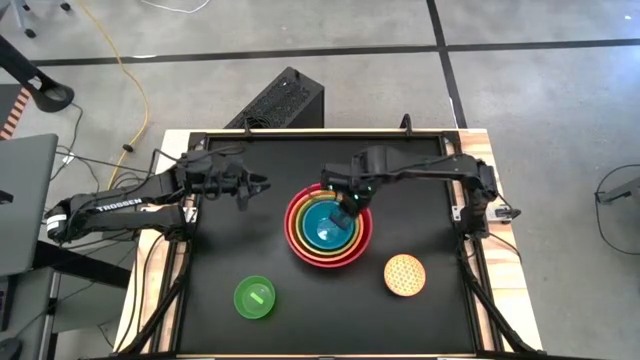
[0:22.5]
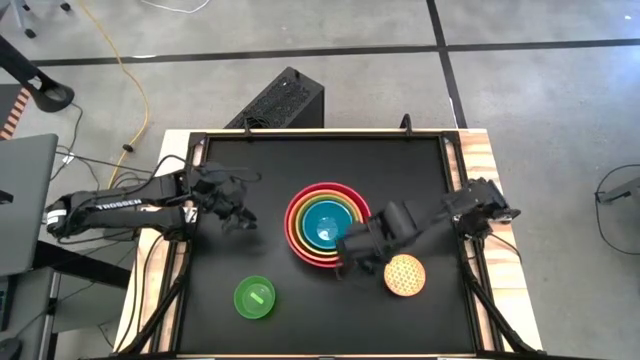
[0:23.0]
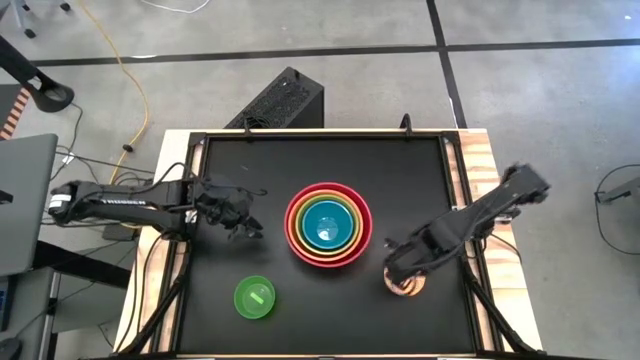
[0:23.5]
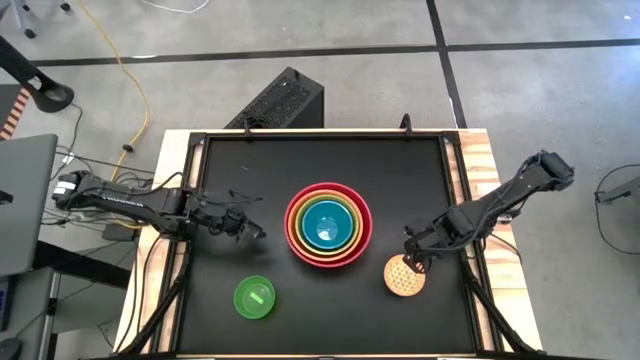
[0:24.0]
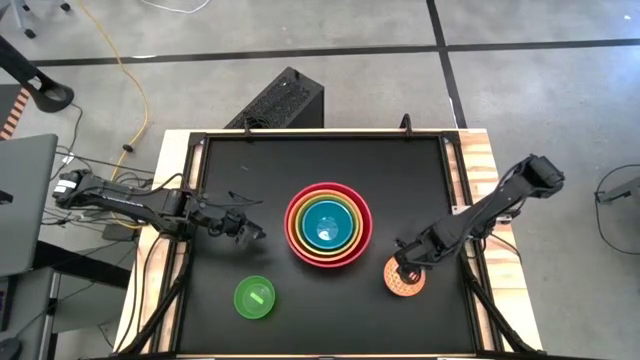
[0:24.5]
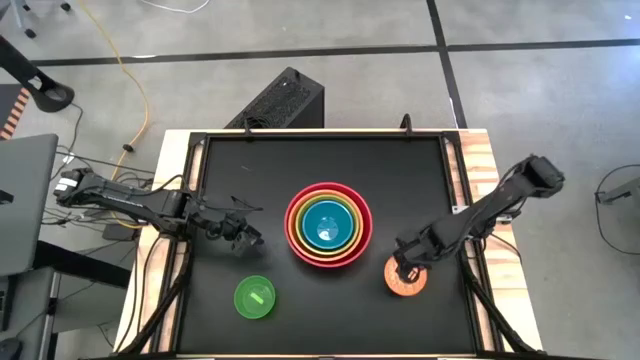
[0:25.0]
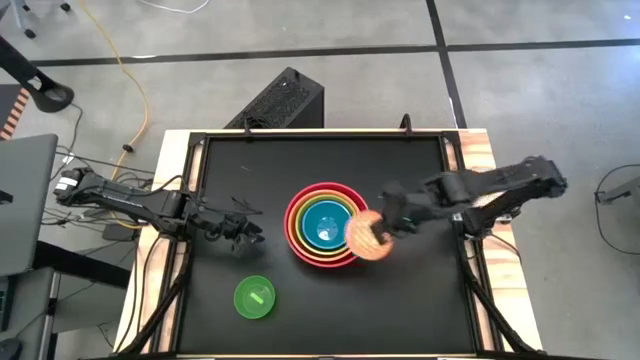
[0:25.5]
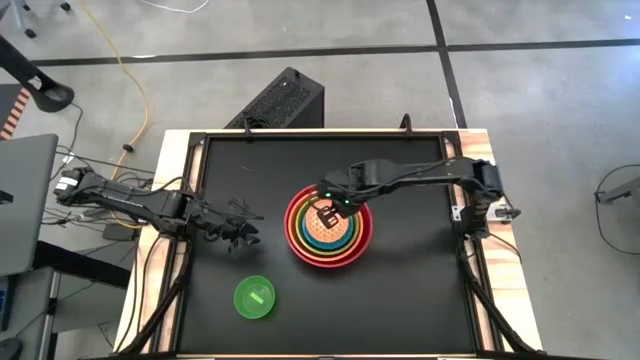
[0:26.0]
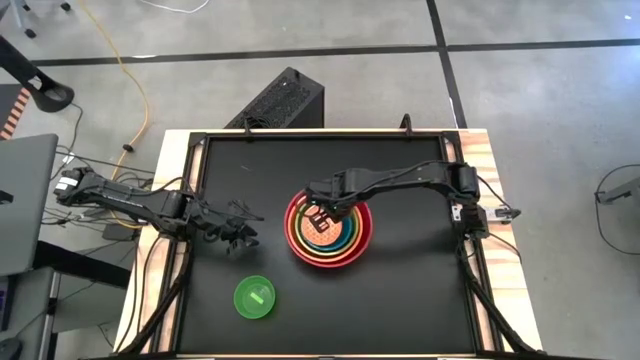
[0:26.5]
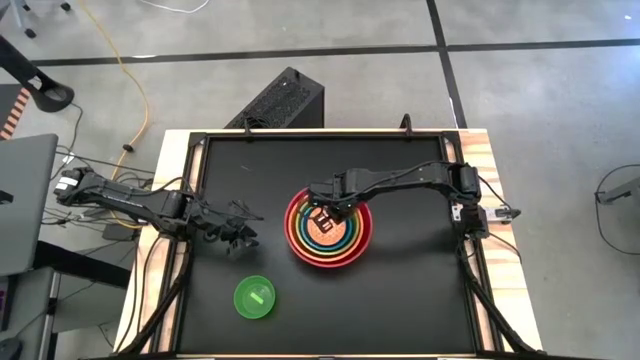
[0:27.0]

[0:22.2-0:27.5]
Stack the yellow bowl on top of the blue bowl

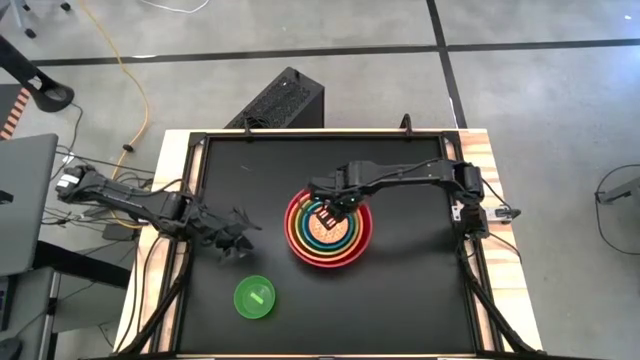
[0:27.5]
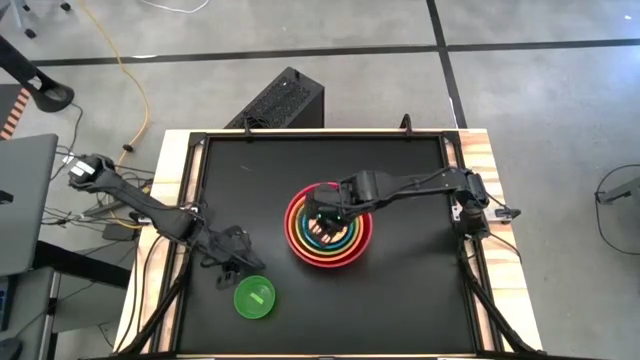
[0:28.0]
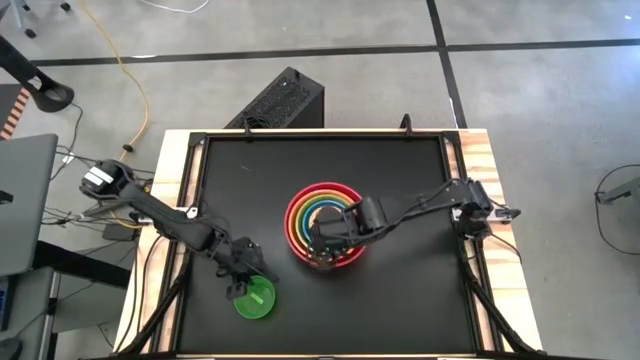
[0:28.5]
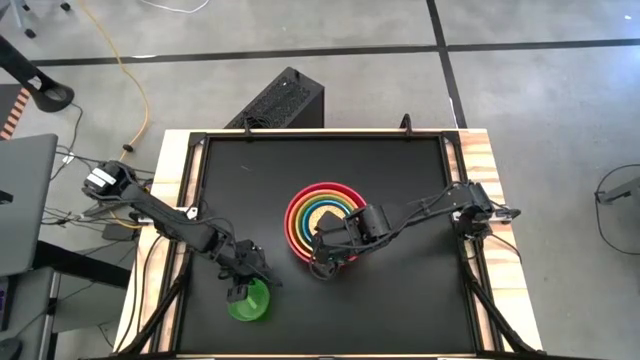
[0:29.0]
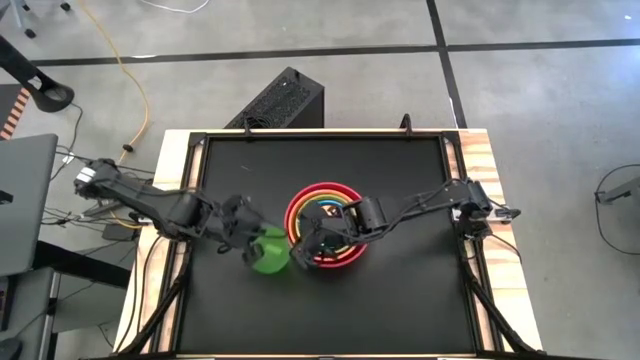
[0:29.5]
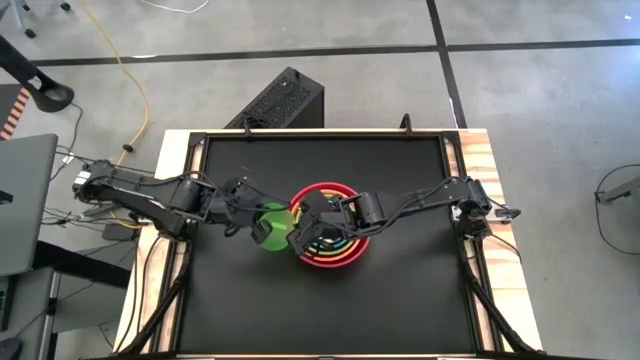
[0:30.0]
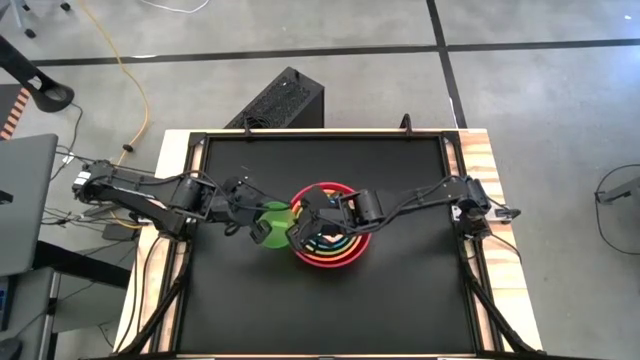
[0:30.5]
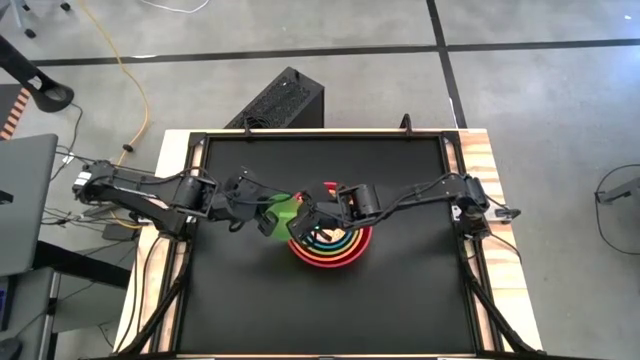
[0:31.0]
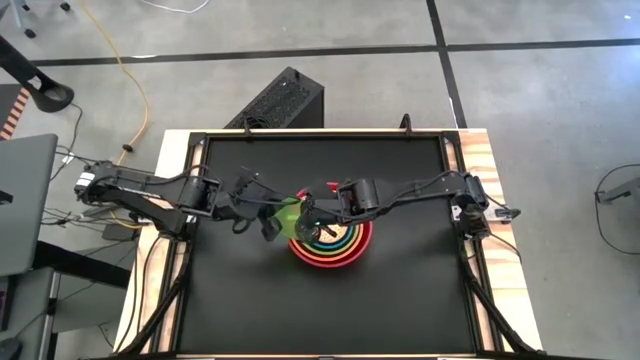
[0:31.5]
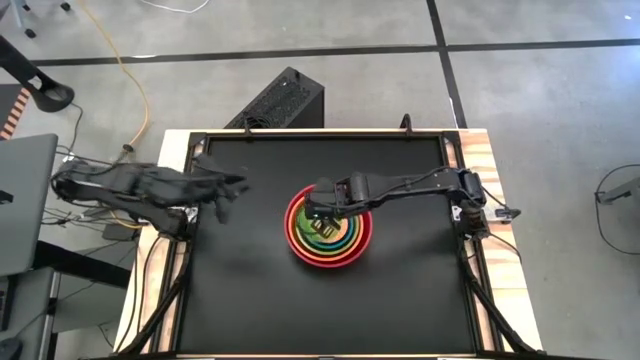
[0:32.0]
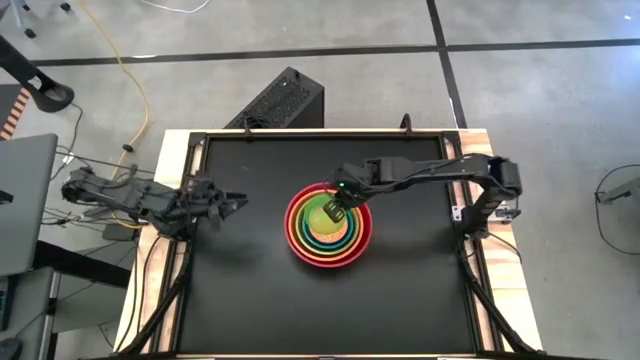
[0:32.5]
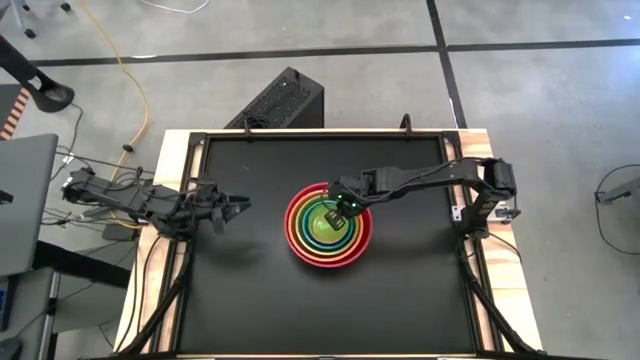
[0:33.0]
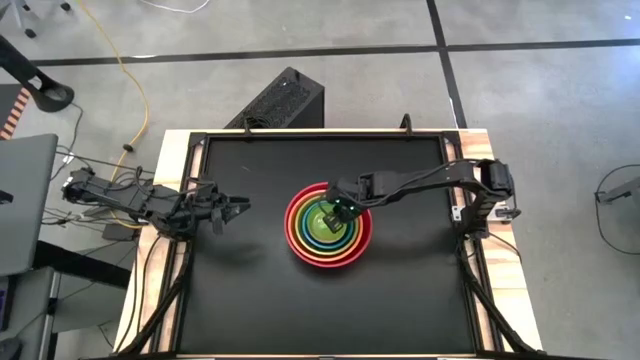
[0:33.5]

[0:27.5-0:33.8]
Stack the green bowl on top of the yellow bowl

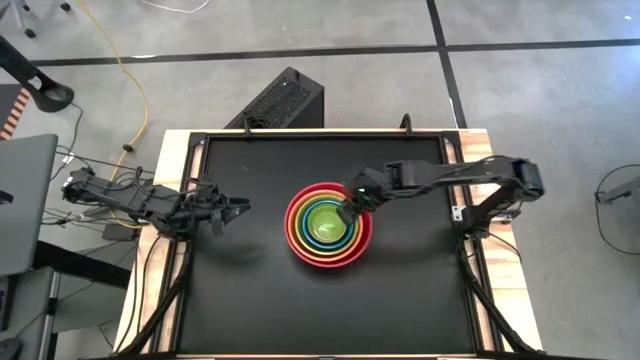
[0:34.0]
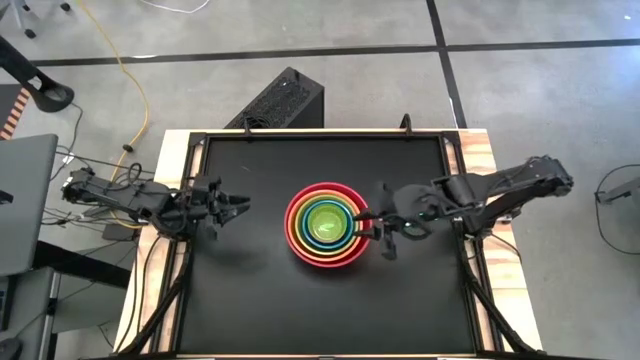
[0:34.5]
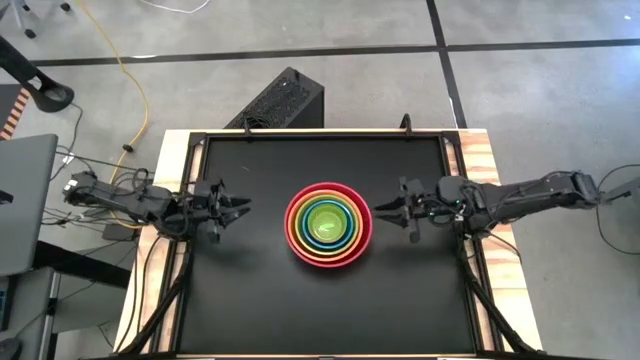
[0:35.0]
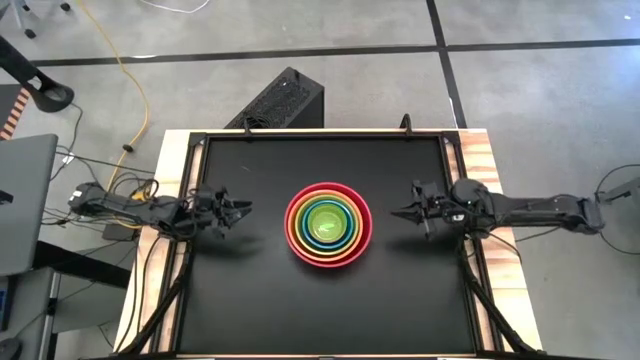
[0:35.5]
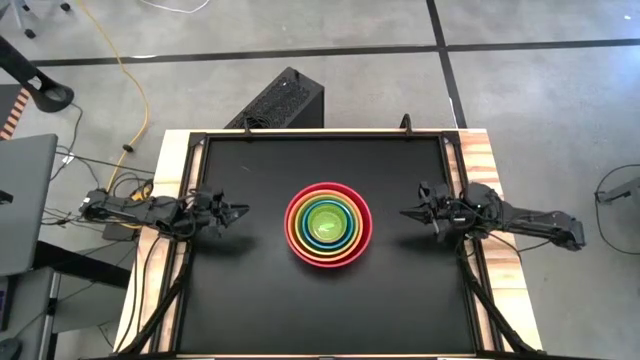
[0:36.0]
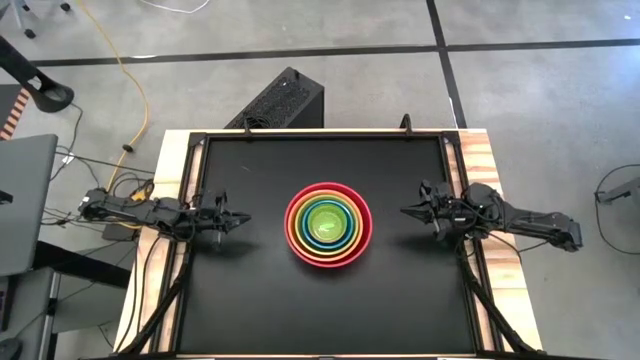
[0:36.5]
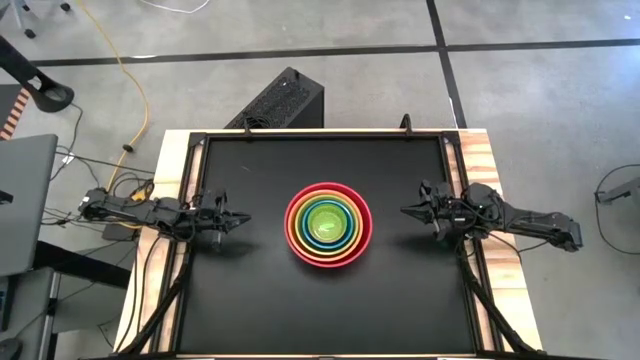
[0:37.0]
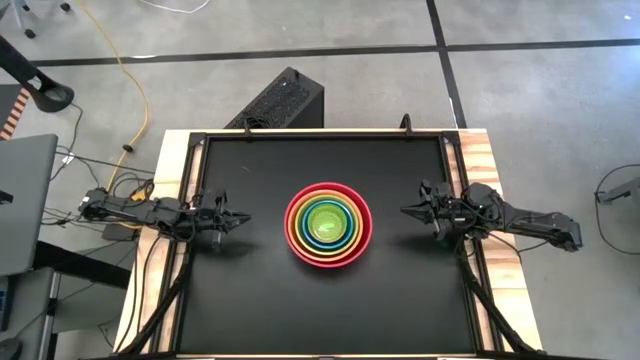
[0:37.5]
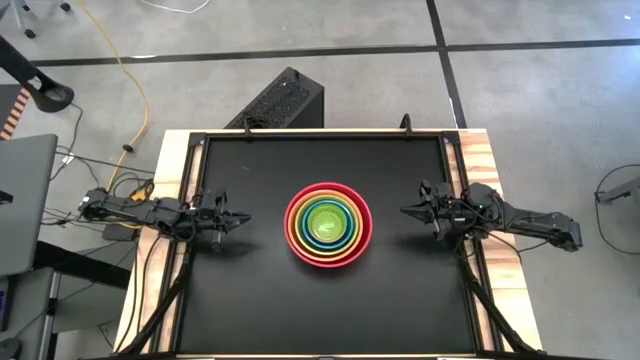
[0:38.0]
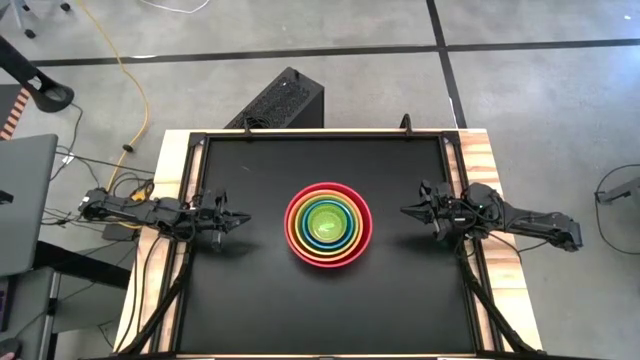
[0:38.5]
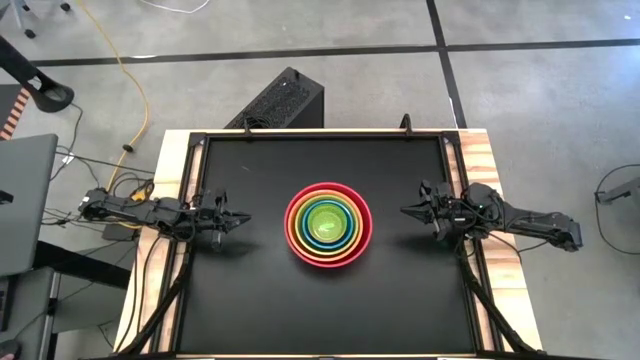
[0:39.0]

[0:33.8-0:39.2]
Return to Home Position
